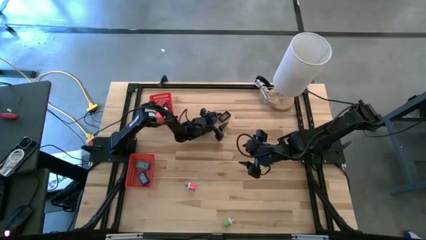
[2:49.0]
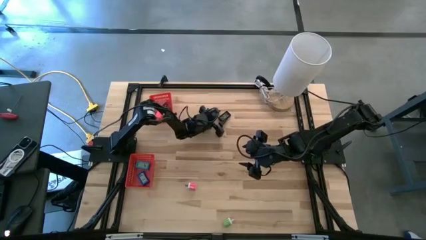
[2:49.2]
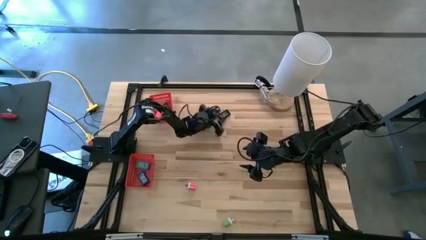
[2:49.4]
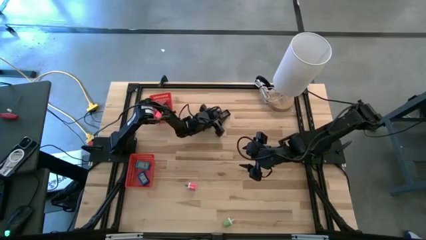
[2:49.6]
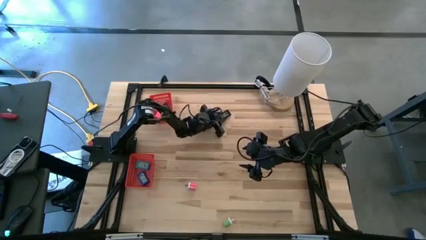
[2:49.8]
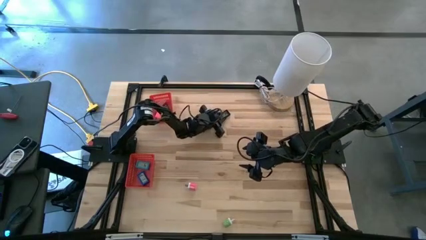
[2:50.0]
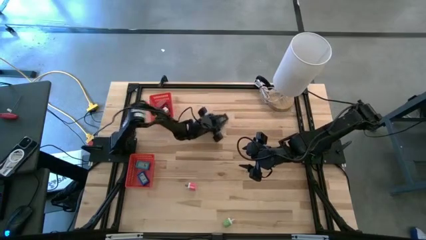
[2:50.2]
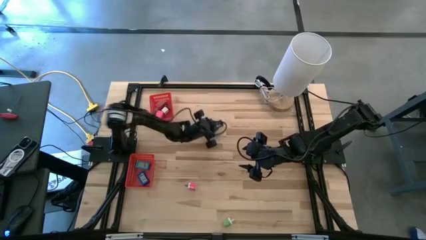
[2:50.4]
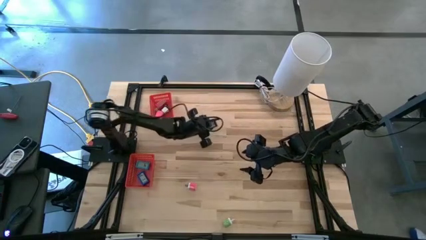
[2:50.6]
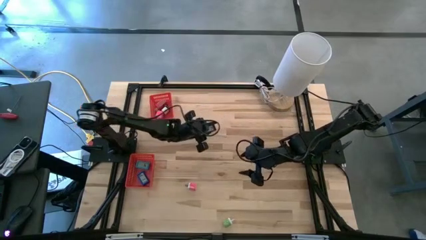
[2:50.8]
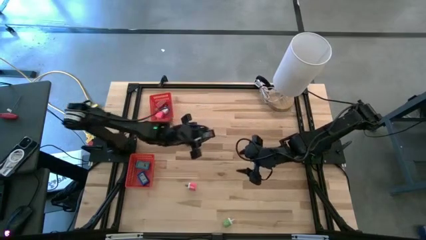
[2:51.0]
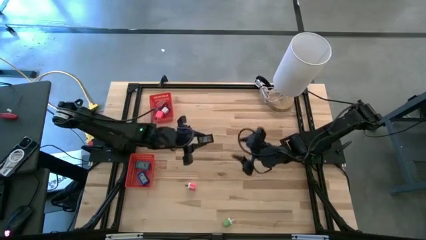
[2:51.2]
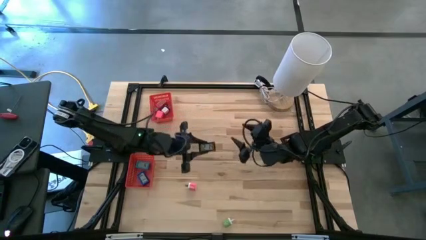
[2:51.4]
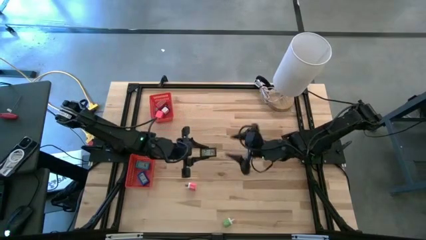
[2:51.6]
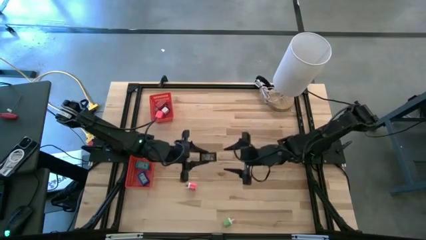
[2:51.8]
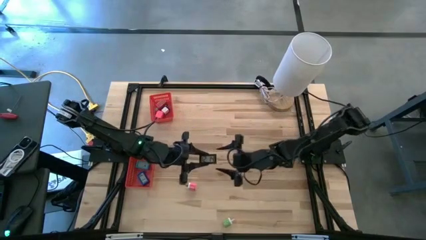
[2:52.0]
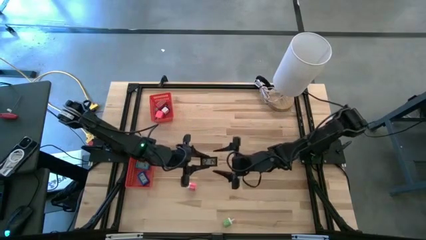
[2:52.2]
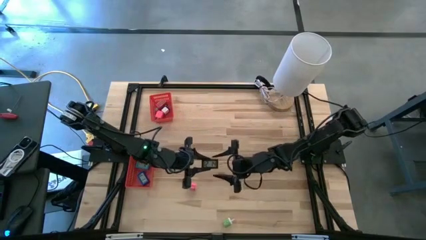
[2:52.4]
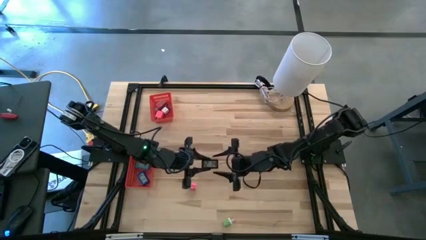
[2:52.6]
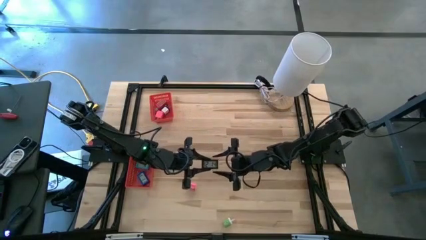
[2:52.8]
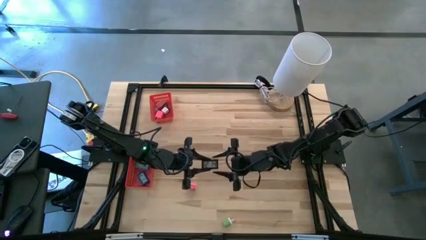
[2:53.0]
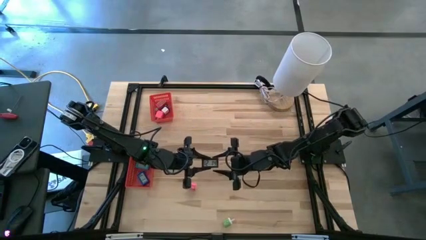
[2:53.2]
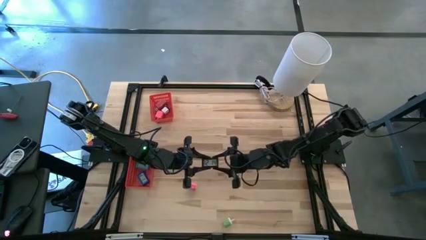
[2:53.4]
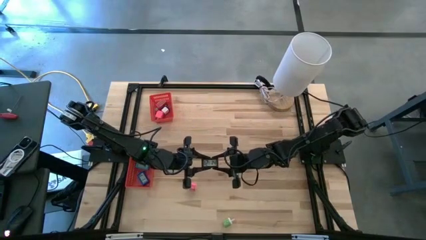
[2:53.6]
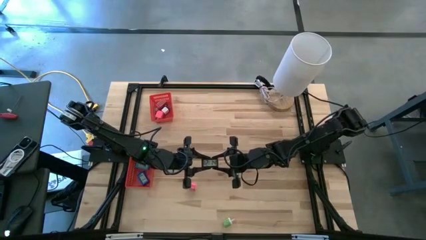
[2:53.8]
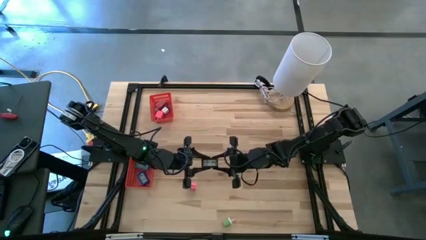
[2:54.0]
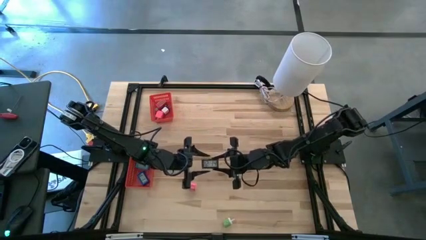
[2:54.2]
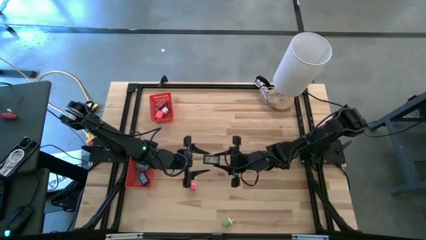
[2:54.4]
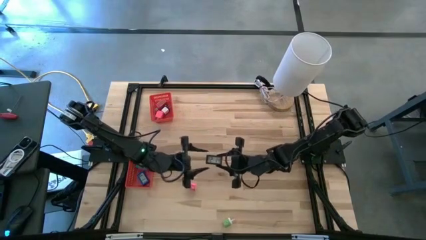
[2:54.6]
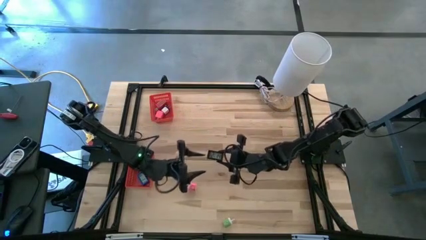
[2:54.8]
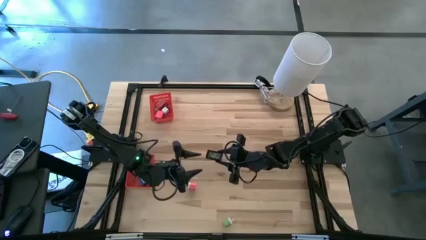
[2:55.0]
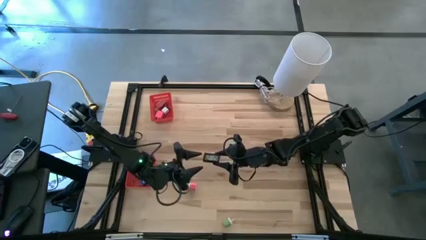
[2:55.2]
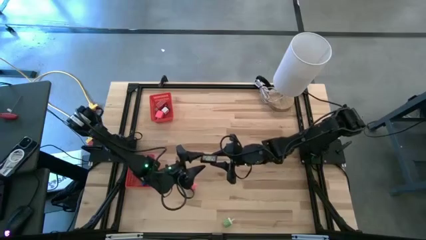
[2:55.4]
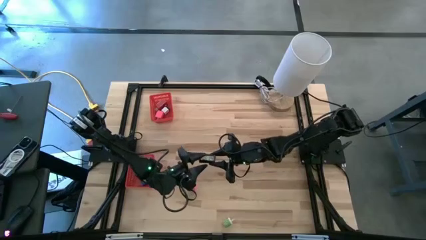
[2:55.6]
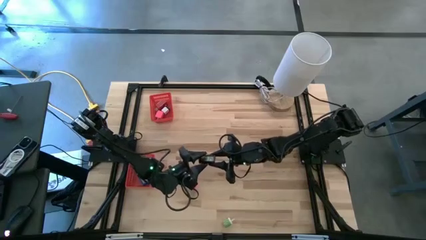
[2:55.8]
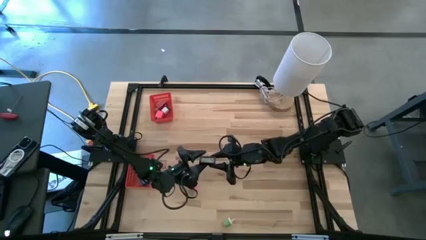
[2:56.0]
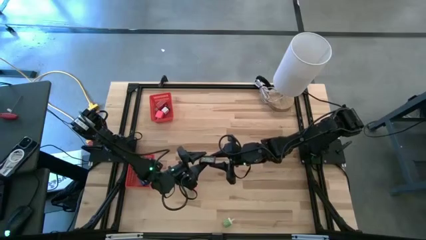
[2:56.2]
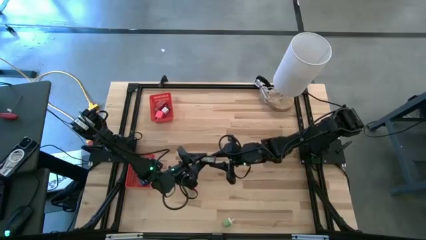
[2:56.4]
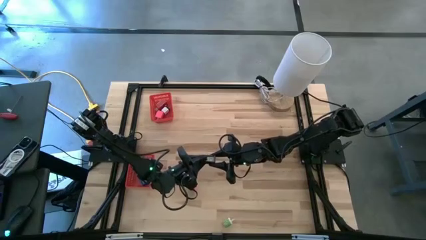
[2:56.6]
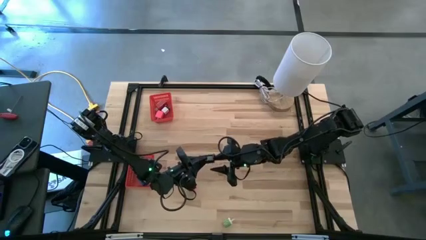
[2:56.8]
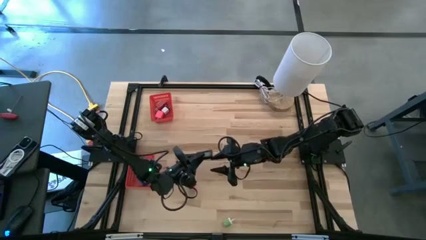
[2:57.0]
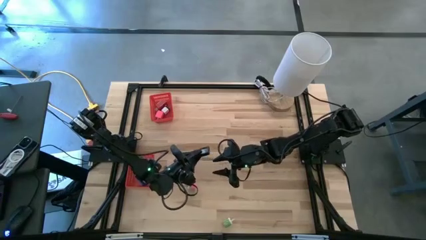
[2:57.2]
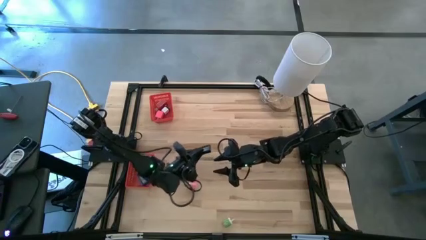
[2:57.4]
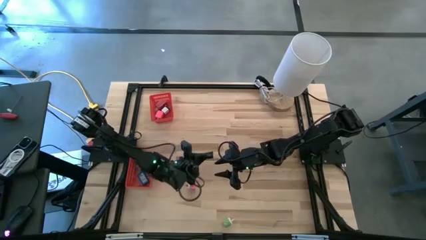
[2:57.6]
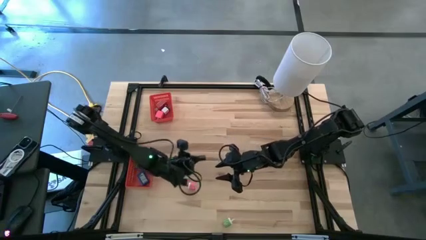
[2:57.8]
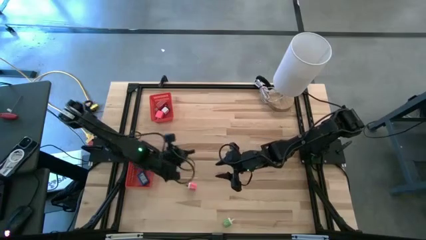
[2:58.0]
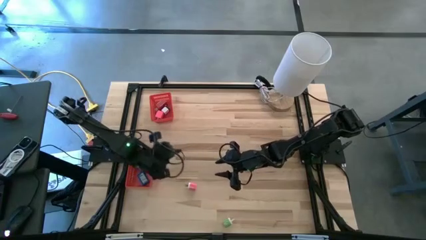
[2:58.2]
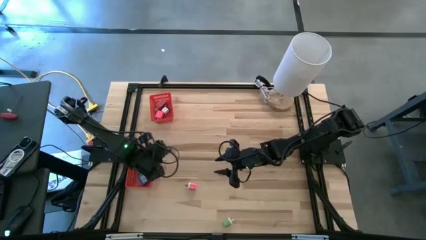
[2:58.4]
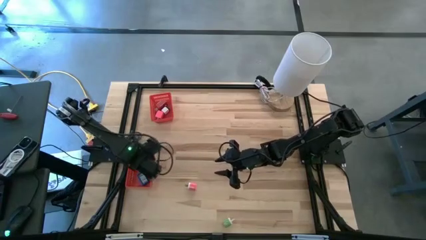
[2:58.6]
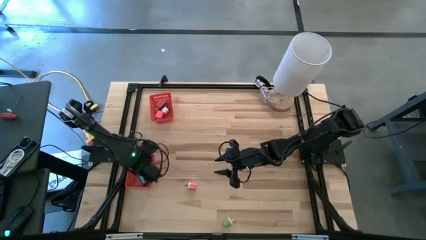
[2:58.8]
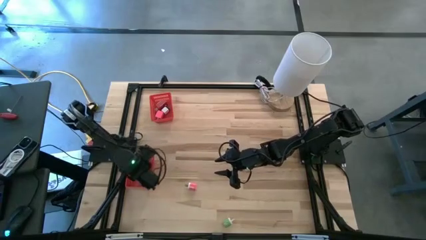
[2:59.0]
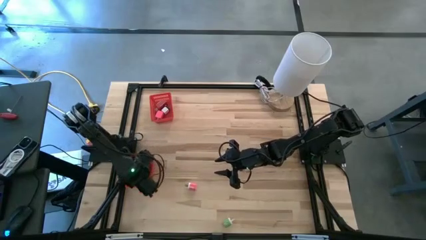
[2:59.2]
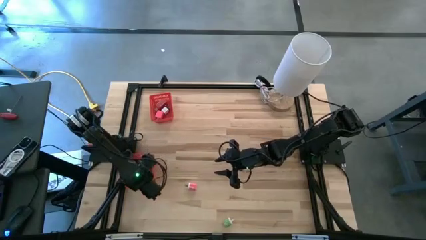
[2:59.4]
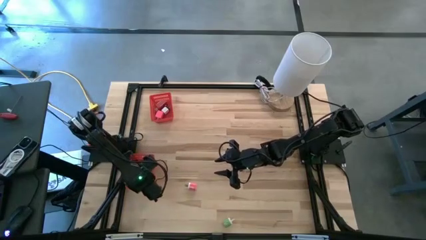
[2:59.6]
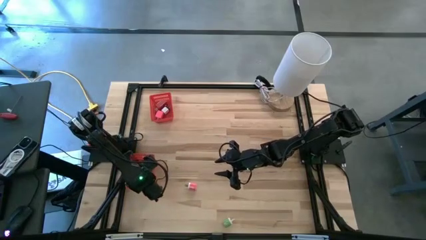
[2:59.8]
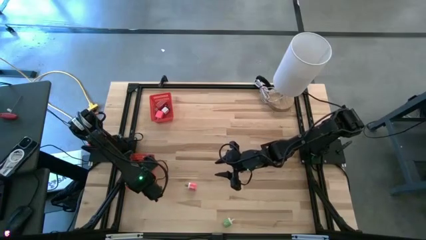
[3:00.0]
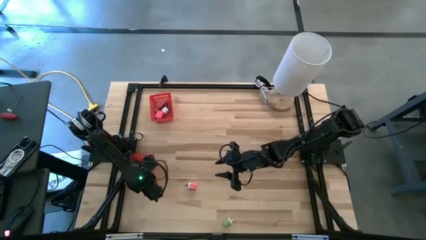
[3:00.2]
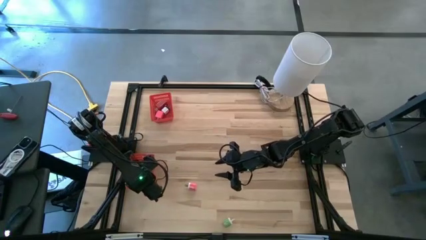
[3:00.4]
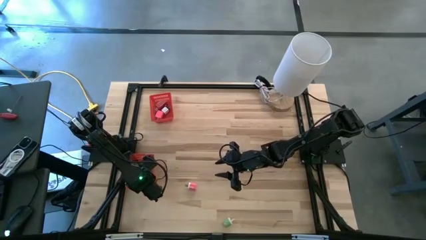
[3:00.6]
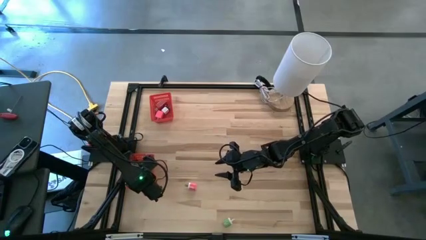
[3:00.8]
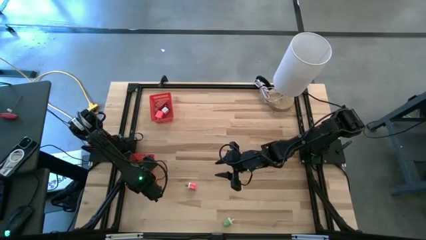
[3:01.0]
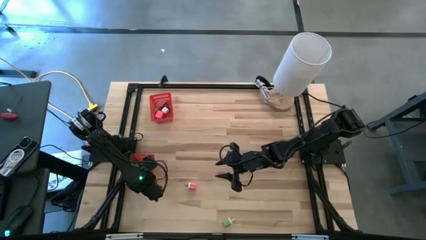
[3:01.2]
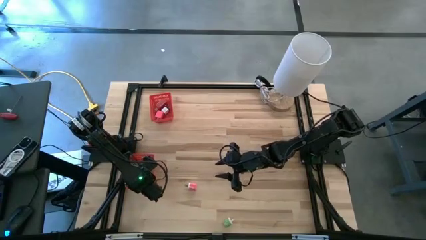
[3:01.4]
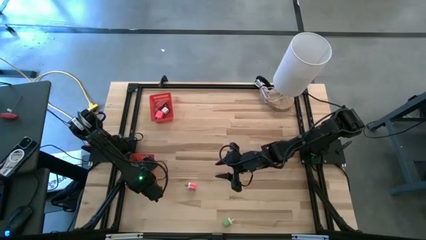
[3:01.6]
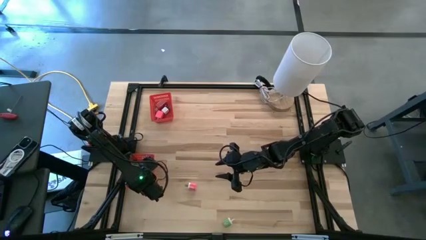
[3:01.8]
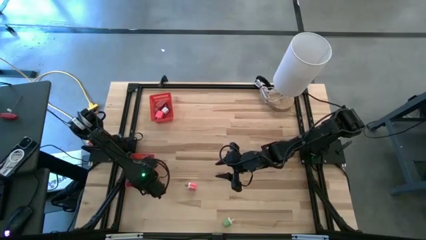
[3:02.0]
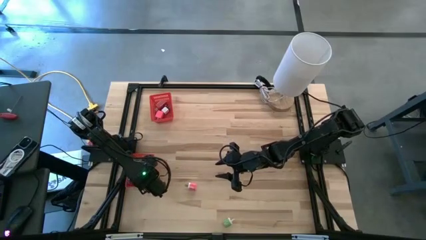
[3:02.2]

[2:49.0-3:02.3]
Task: Pick & Place Office items
Put the black digital clock into the bottom red bin
